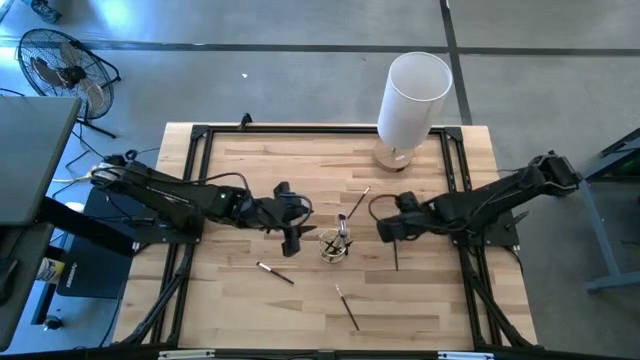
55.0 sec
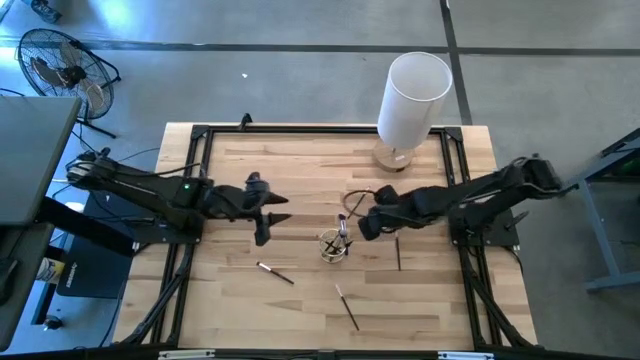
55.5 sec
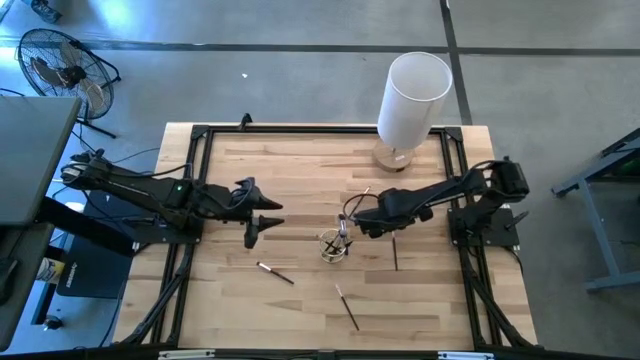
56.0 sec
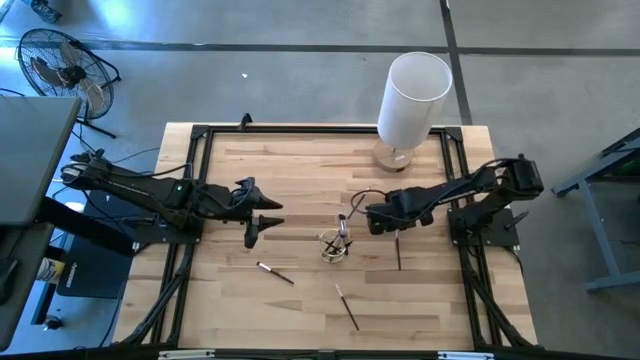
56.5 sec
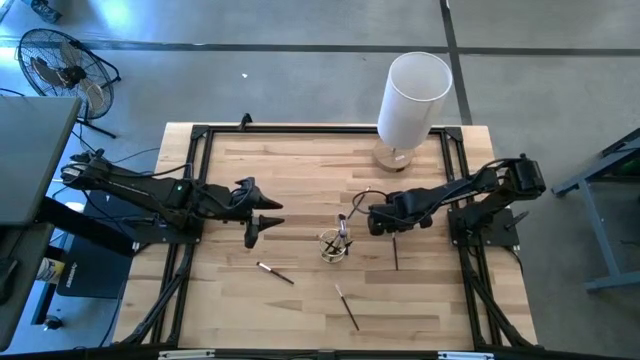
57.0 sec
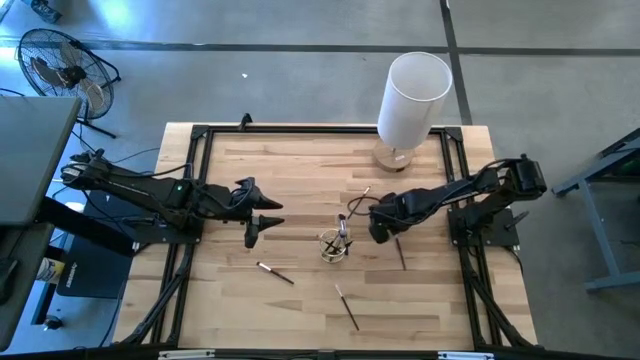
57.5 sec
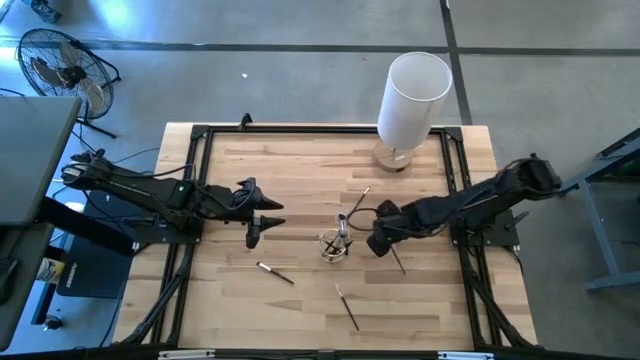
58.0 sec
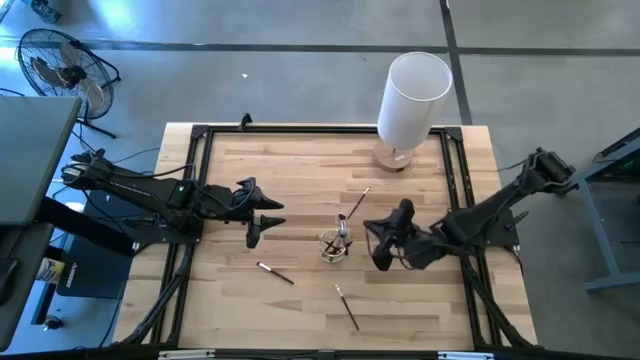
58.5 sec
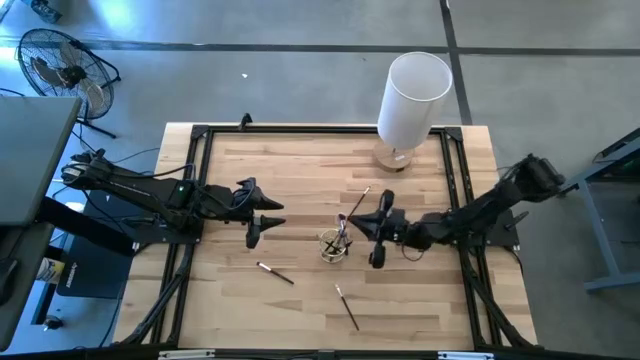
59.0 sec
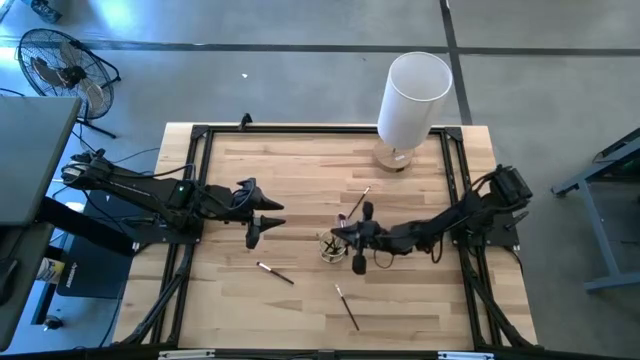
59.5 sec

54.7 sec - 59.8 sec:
Task: Put items in baskets/containers
Put the eyeshadow brush into the mesh organizer

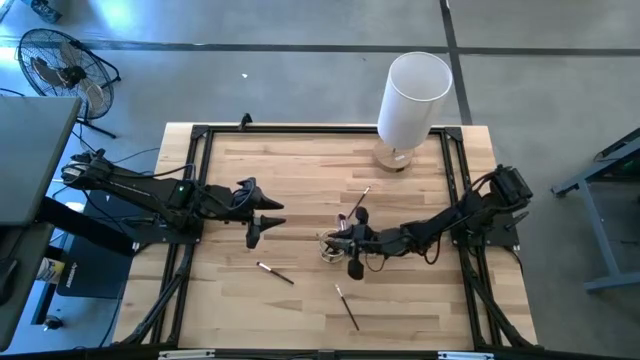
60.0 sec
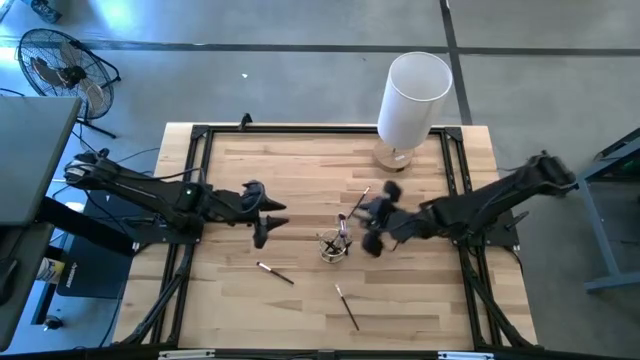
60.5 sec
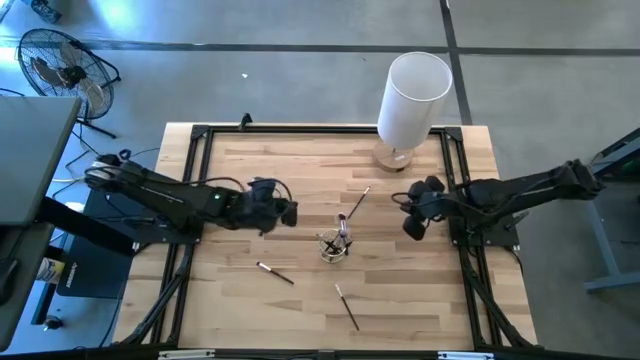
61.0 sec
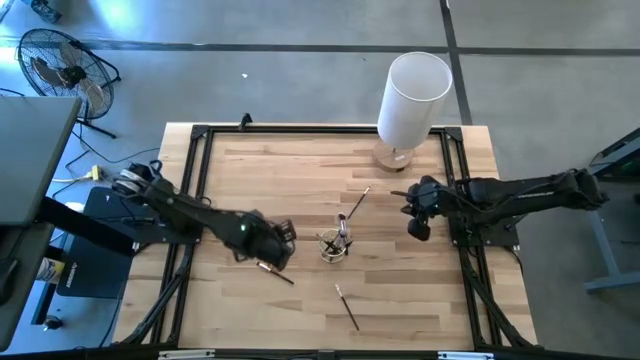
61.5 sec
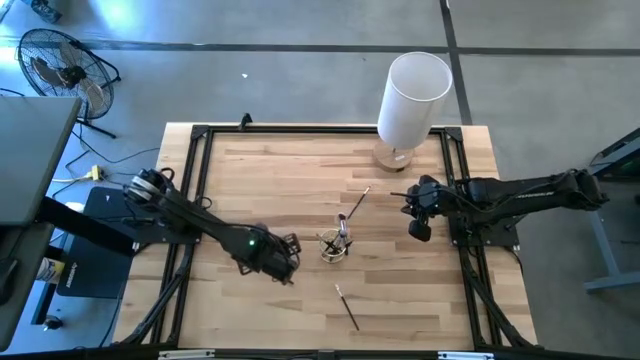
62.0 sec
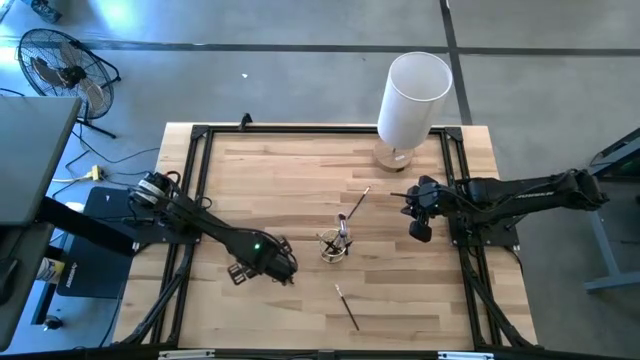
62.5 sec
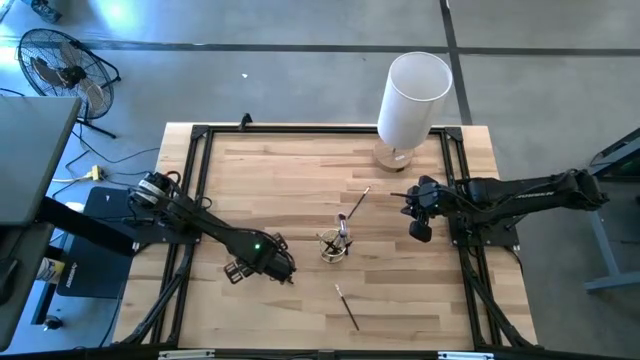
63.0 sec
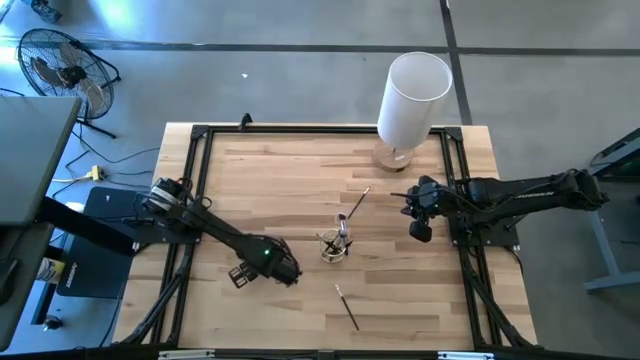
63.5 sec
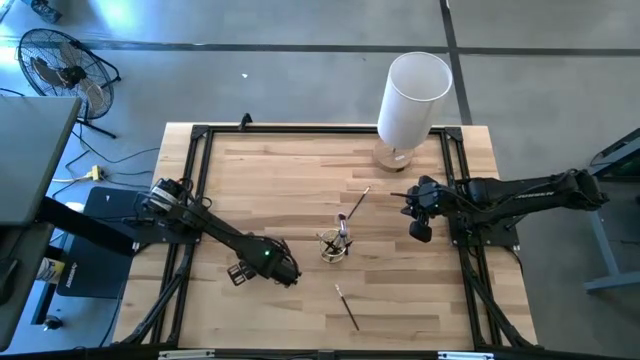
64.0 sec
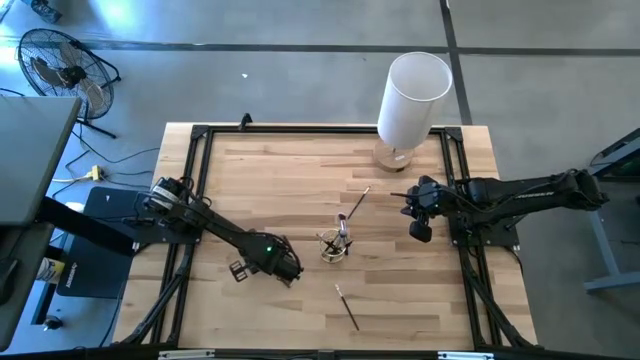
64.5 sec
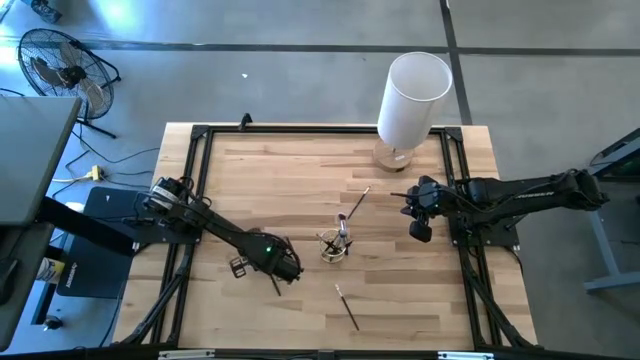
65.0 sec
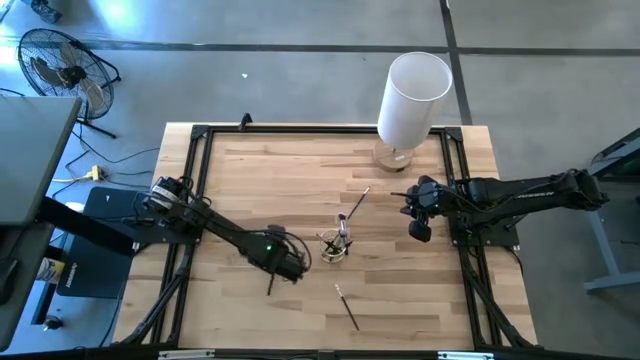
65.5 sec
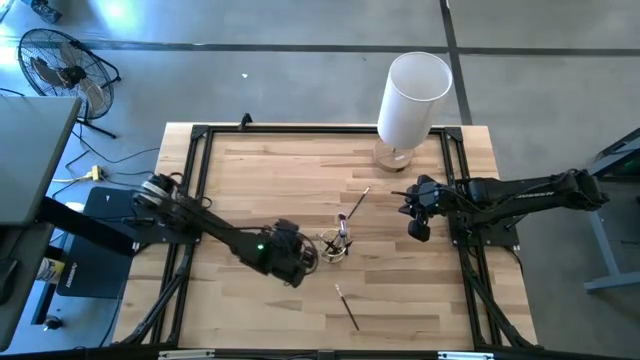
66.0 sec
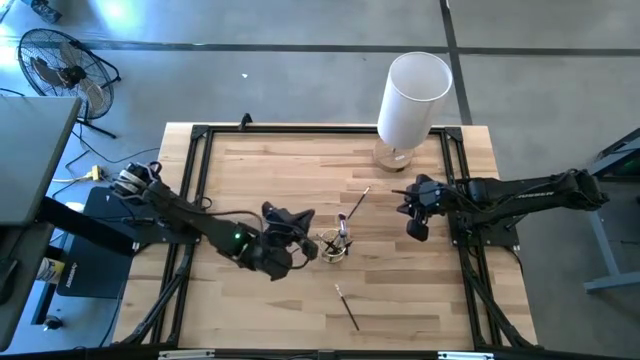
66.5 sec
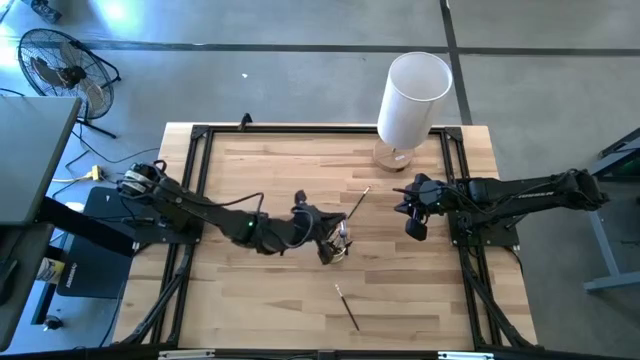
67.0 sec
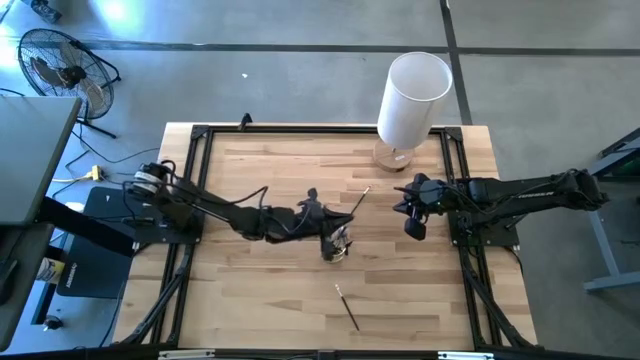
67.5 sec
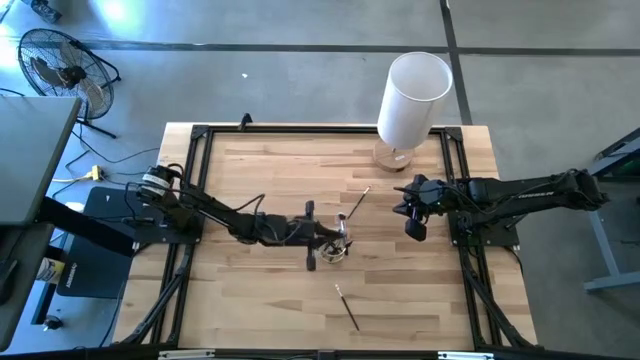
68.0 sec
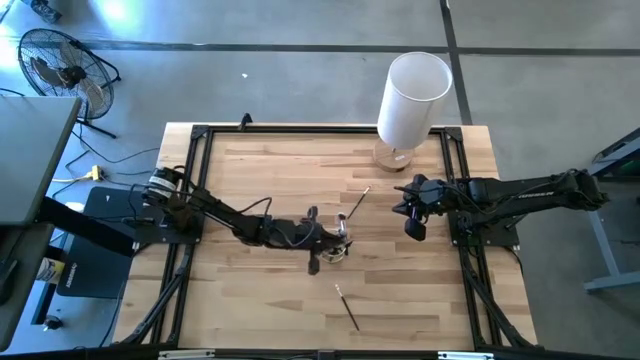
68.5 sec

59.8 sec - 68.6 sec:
Put the eyeshadow brush into the mesh organizer

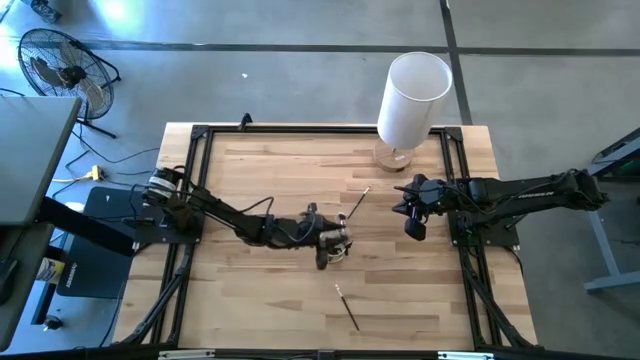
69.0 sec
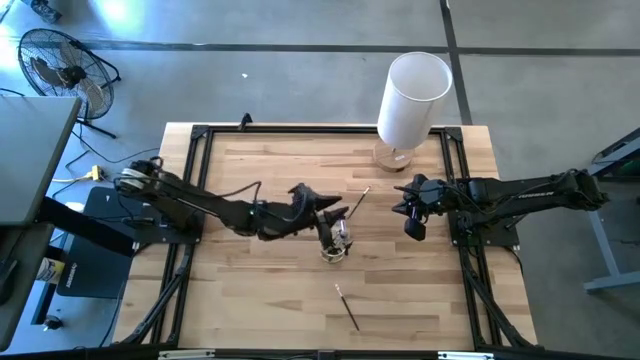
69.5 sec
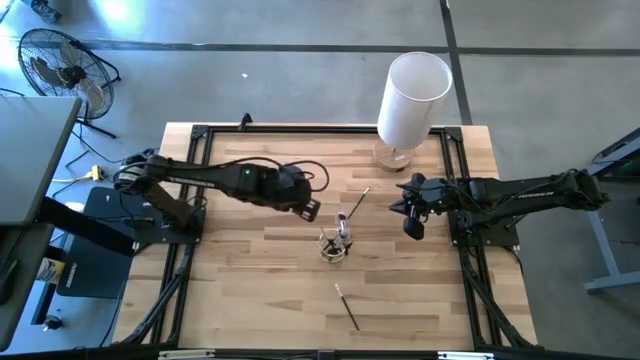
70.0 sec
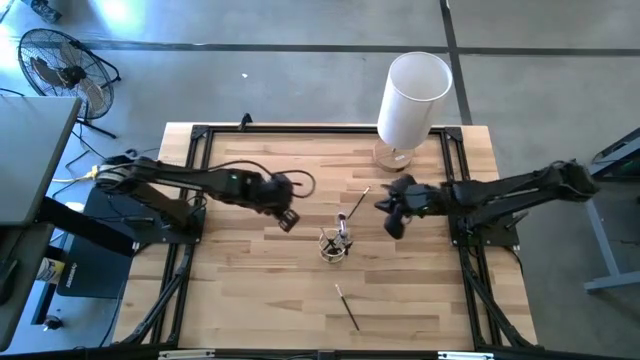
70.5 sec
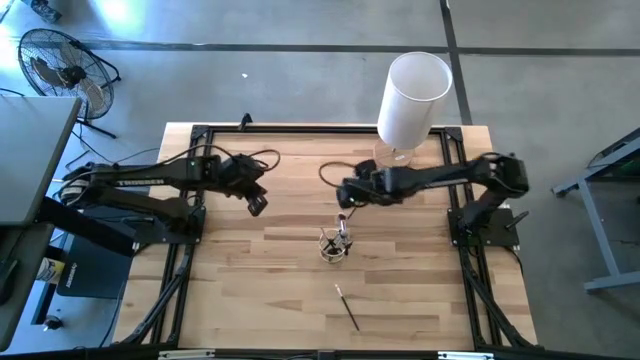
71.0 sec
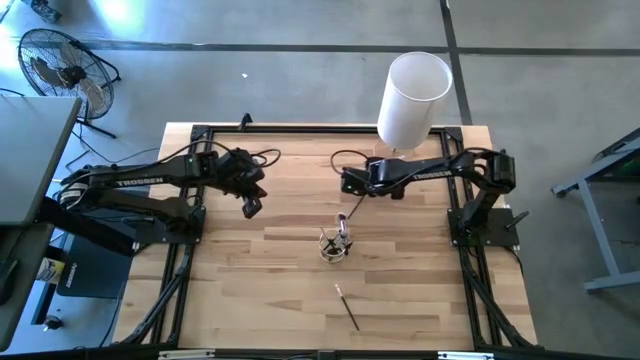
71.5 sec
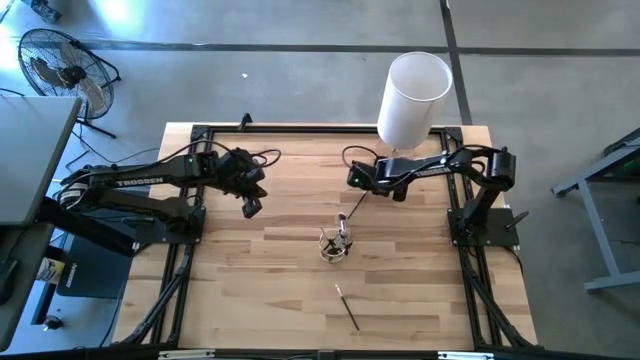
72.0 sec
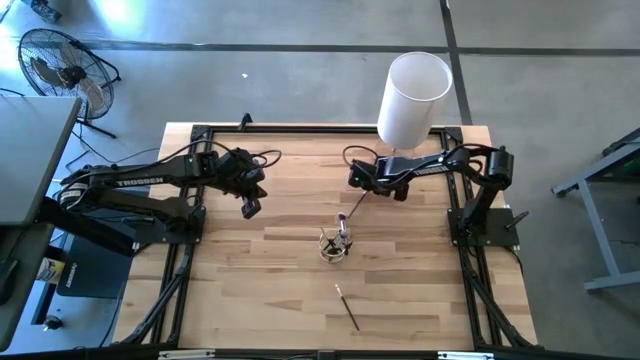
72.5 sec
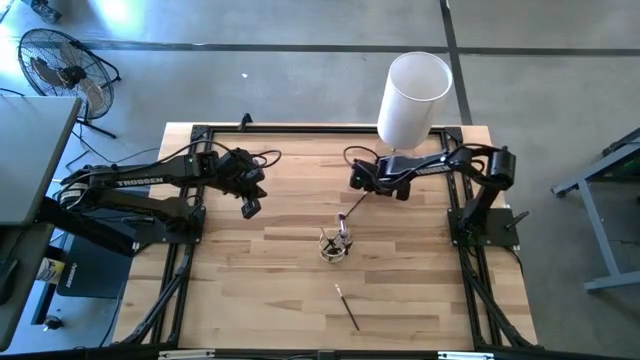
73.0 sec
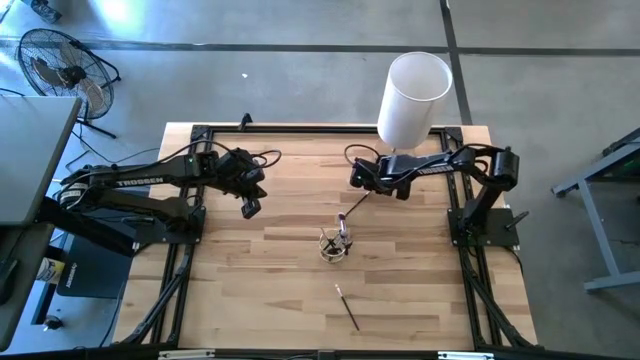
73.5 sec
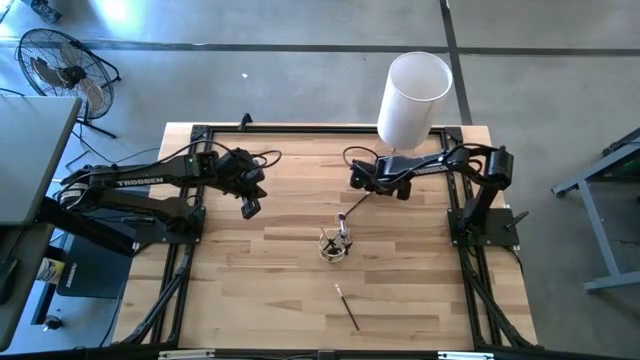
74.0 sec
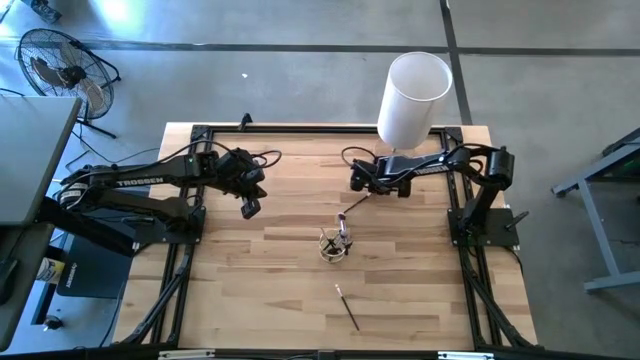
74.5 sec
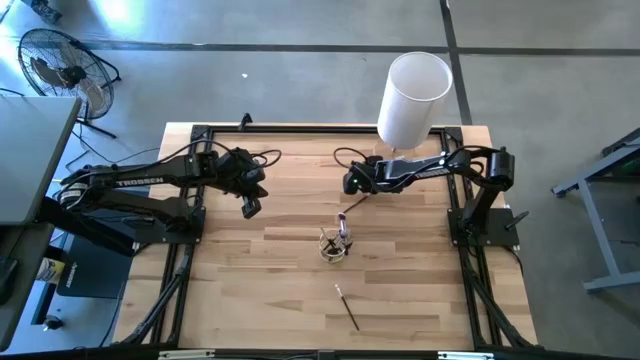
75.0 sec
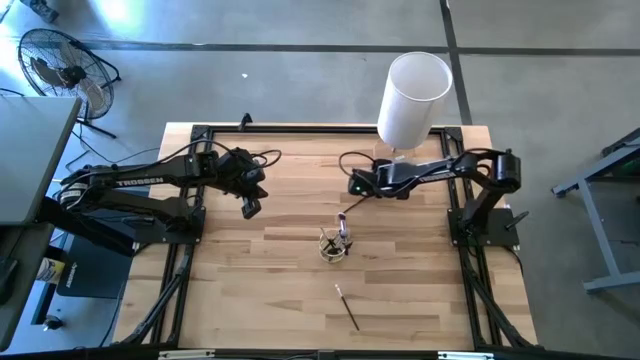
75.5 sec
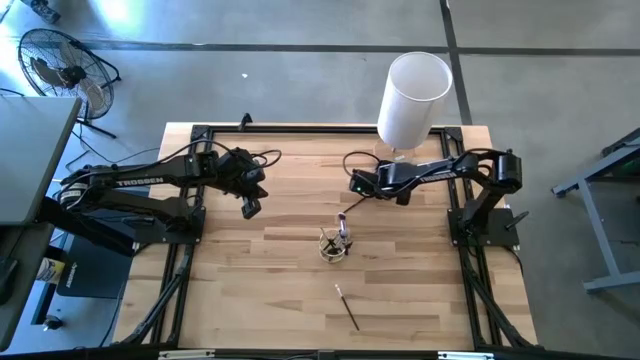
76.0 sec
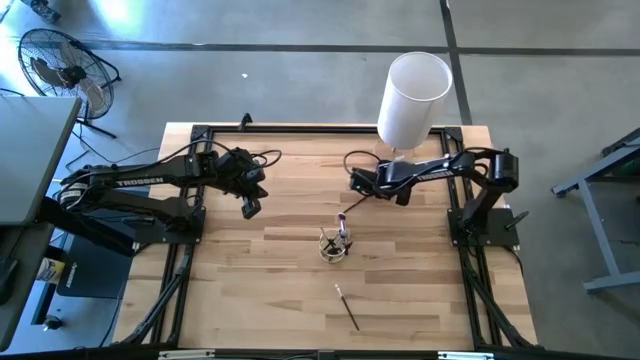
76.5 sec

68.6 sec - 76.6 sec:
Put the eyeshadow brush into the mesh organizer
